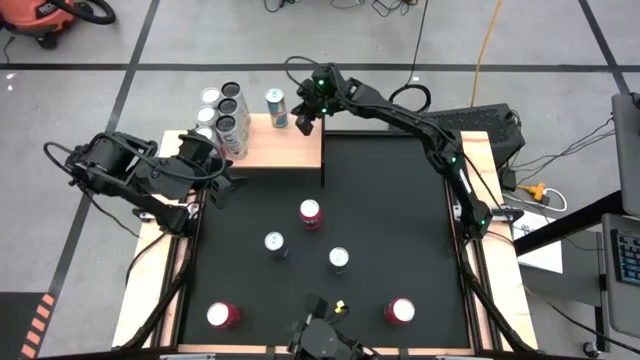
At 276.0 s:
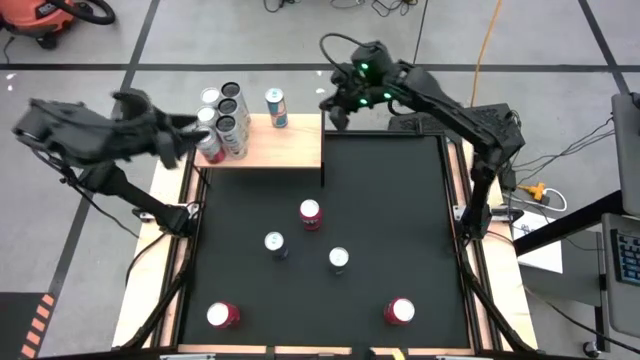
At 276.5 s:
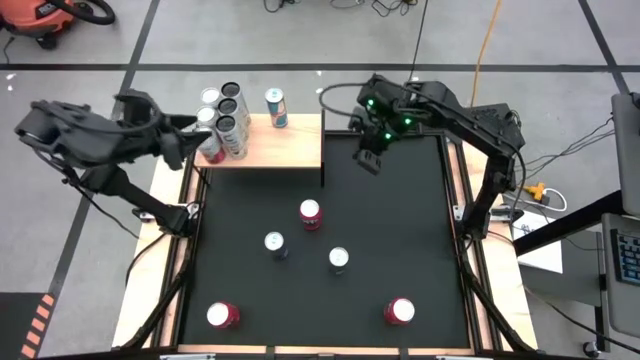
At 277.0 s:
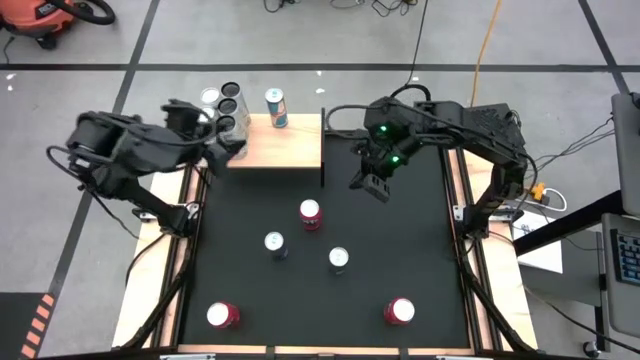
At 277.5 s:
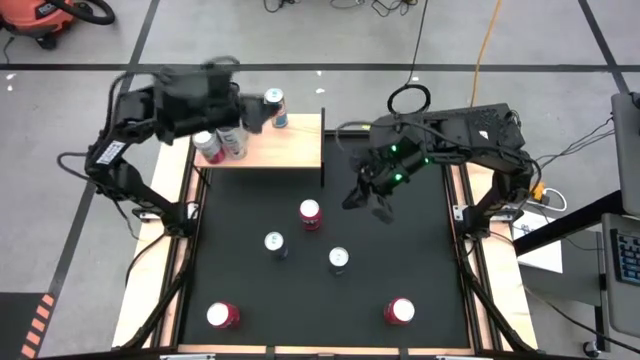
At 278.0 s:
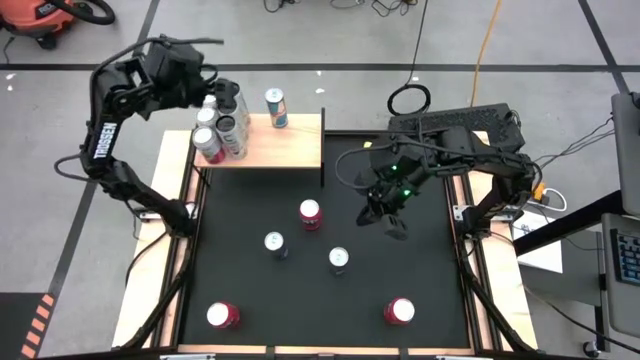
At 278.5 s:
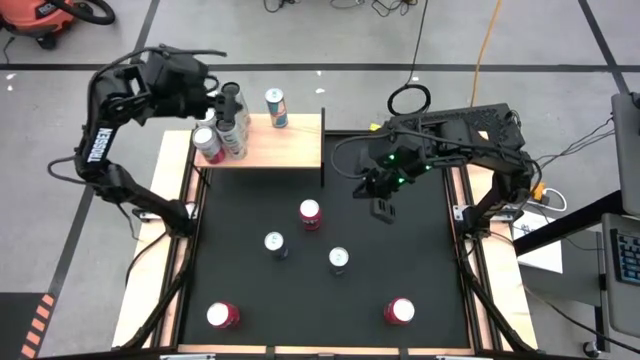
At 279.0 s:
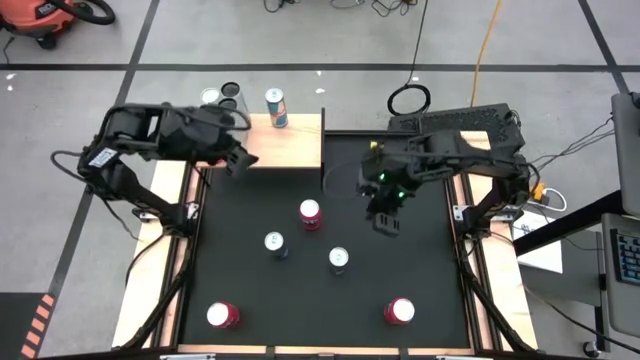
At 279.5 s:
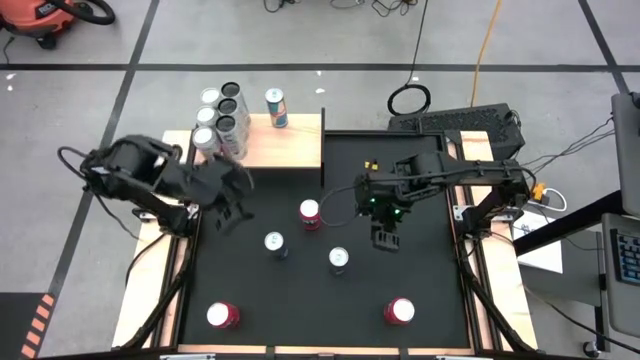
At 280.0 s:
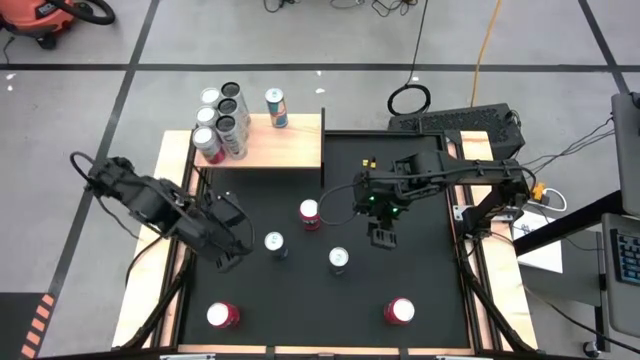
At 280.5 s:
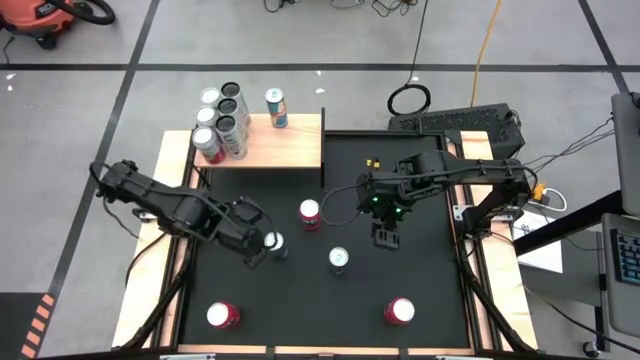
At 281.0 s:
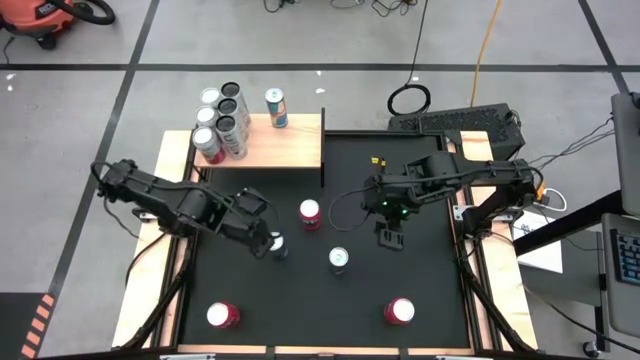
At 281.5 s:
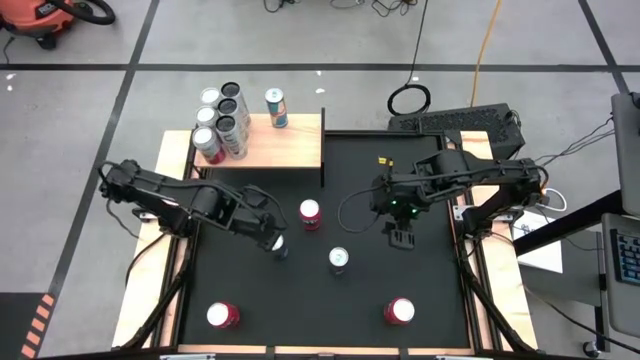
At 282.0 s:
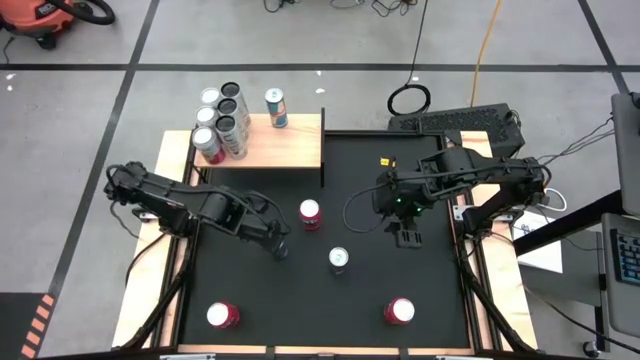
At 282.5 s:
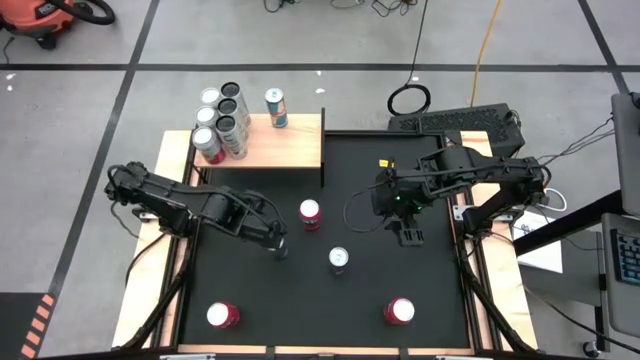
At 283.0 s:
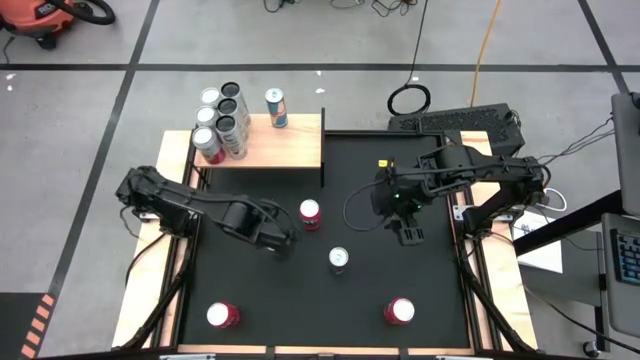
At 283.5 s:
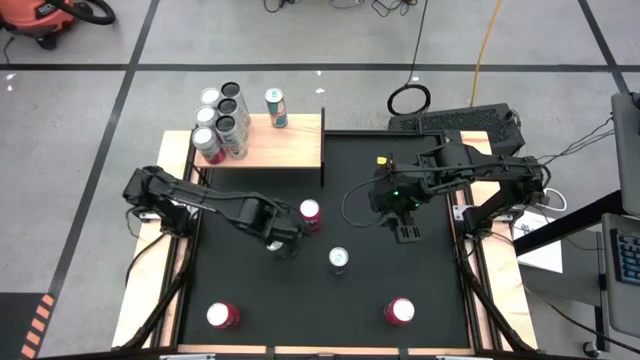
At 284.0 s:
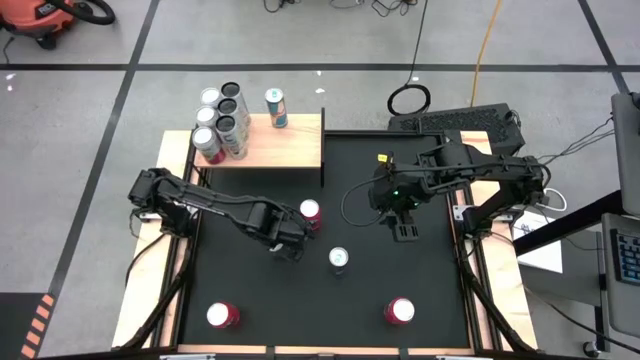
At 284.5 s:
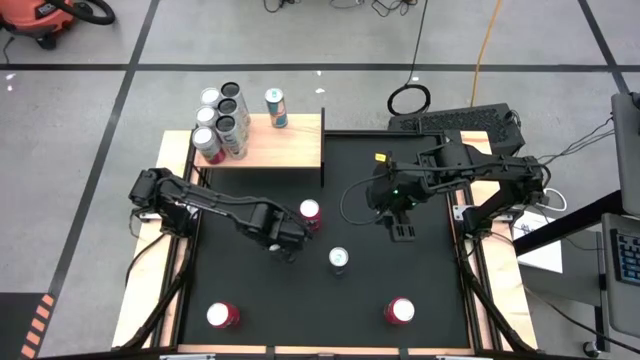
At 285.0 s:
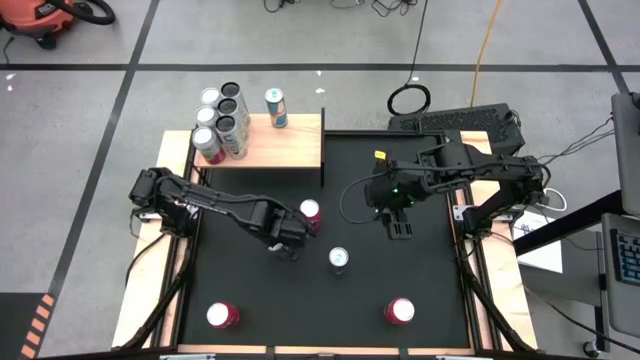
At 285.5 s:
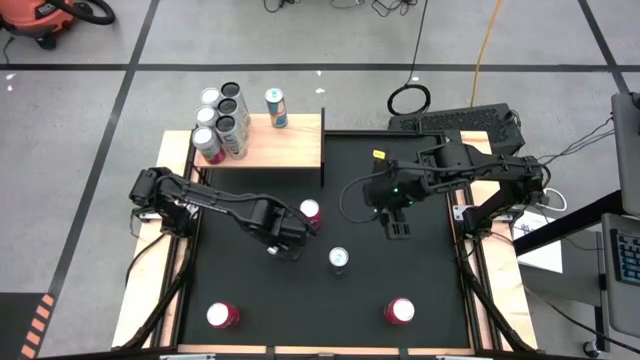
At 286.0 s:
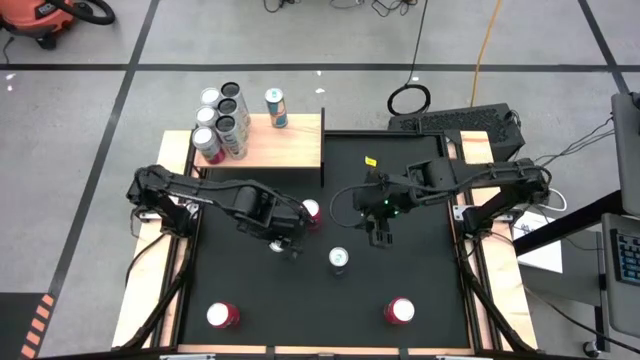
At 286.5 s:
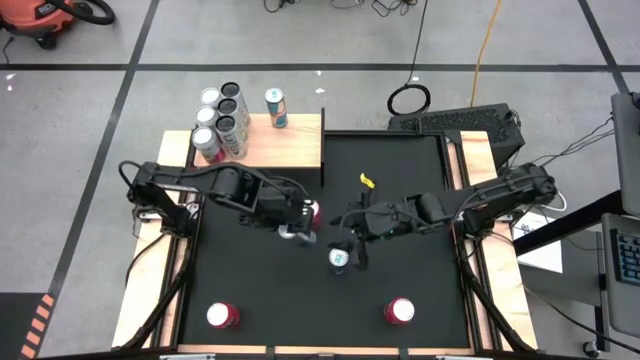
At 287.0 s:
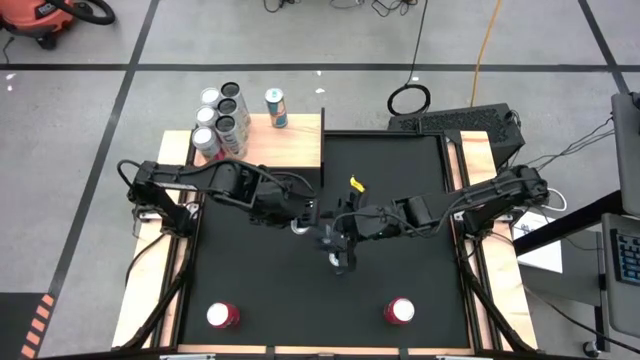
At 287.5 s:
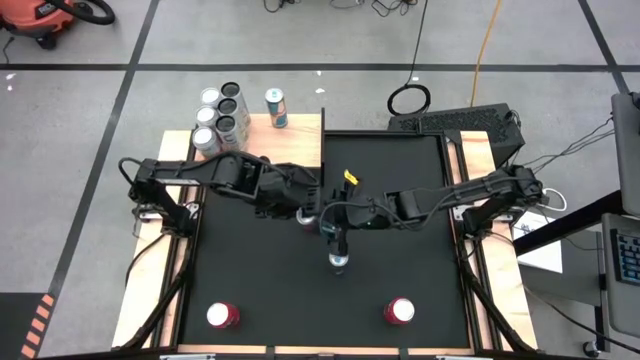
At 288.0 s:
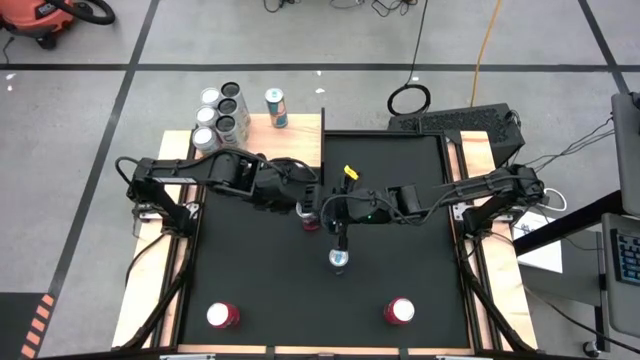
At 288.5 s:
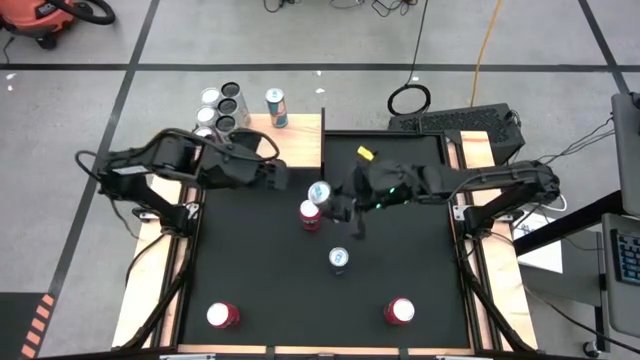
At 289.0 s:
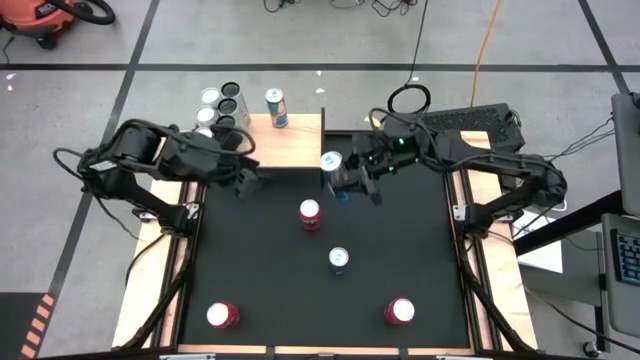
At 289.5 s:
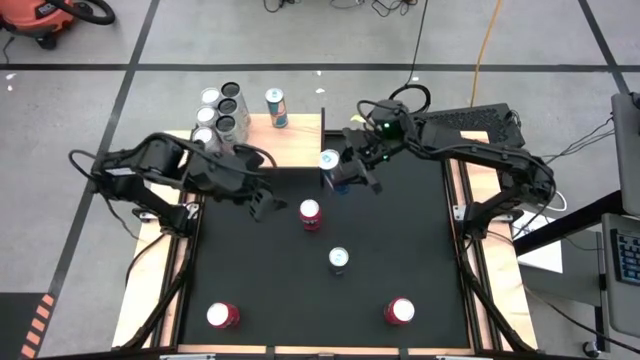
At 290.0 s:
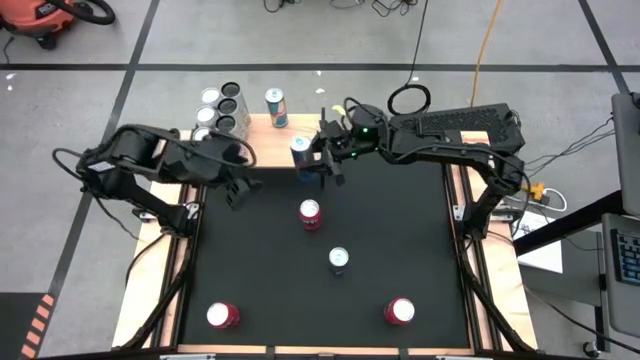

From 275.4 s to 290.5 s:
Task: Place canned beverage on shelf
Put the top blue soda can on the shelf aligned with the other blue soda can

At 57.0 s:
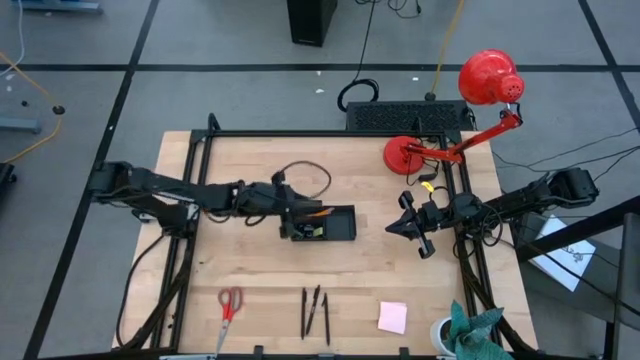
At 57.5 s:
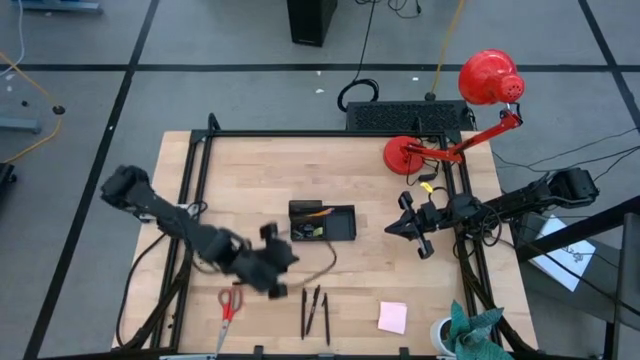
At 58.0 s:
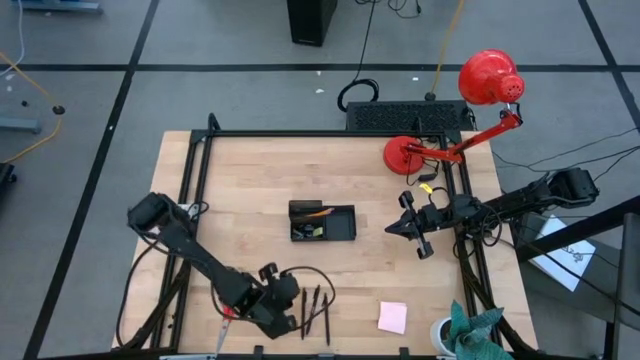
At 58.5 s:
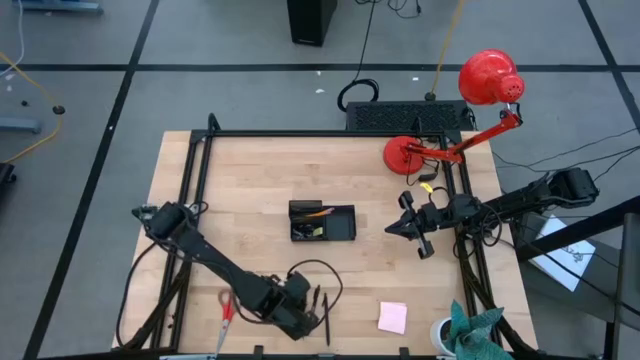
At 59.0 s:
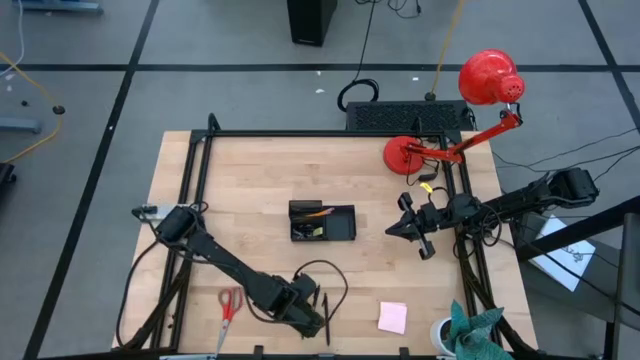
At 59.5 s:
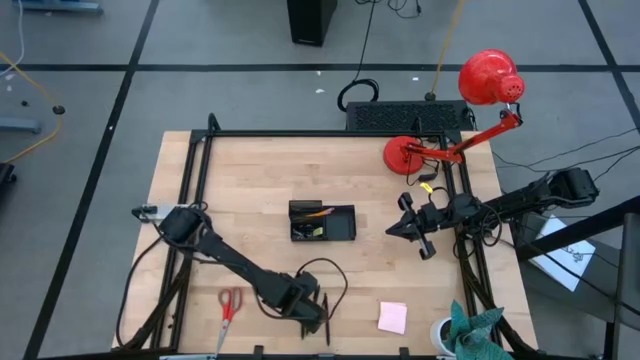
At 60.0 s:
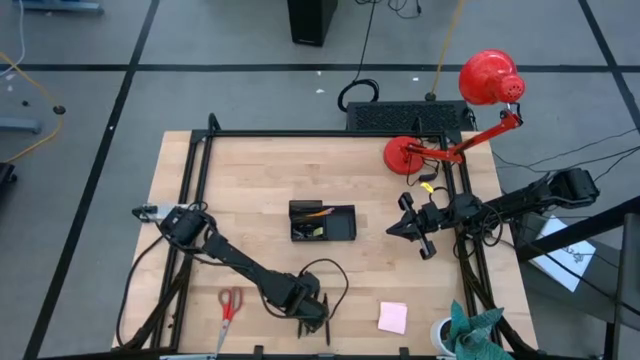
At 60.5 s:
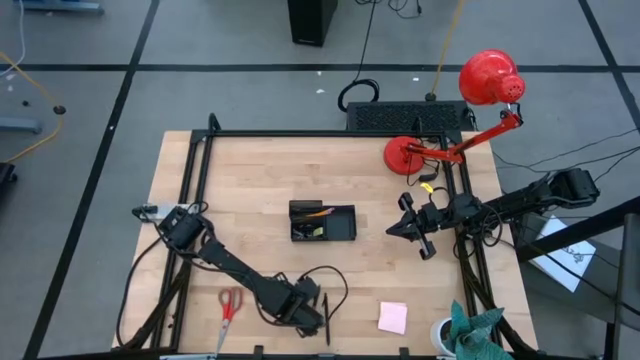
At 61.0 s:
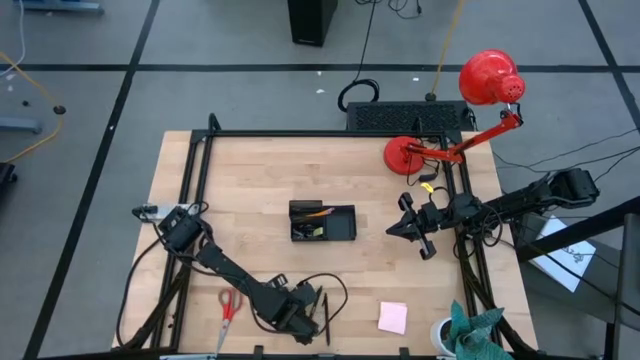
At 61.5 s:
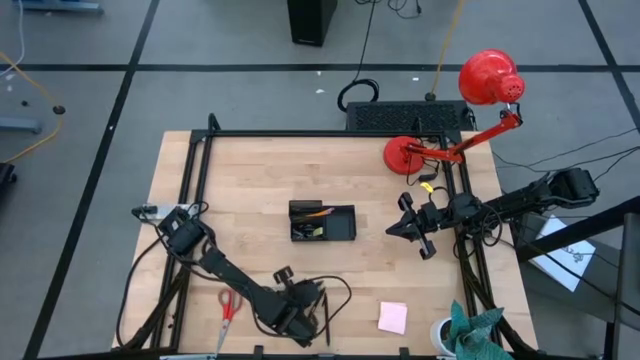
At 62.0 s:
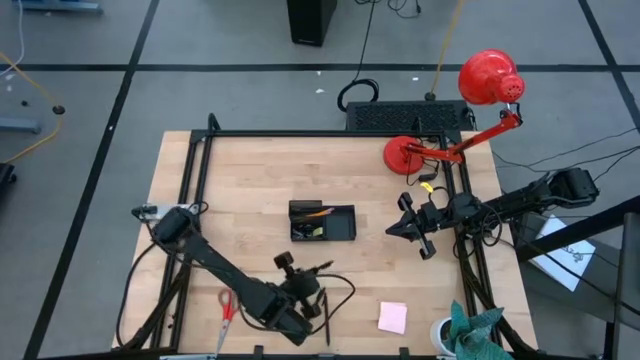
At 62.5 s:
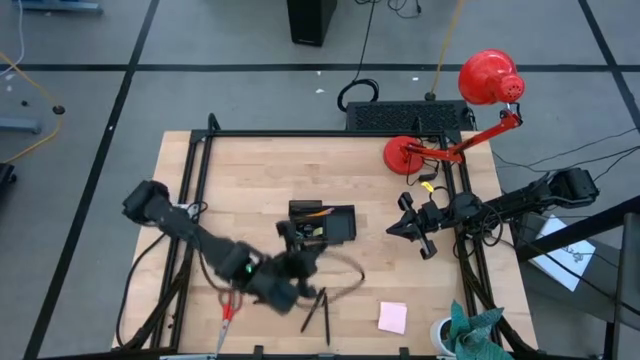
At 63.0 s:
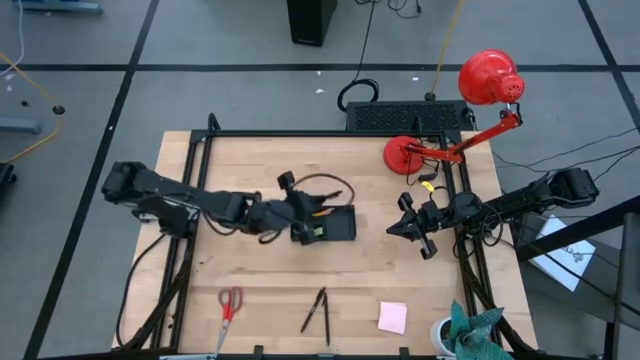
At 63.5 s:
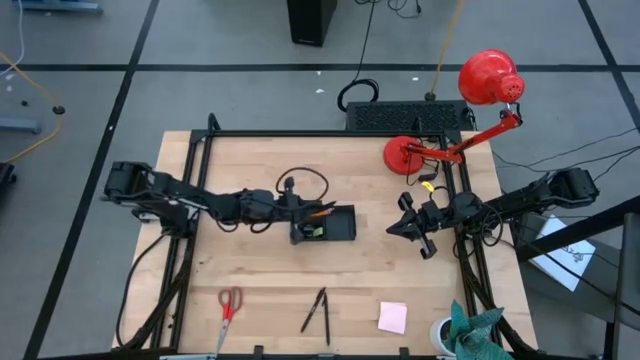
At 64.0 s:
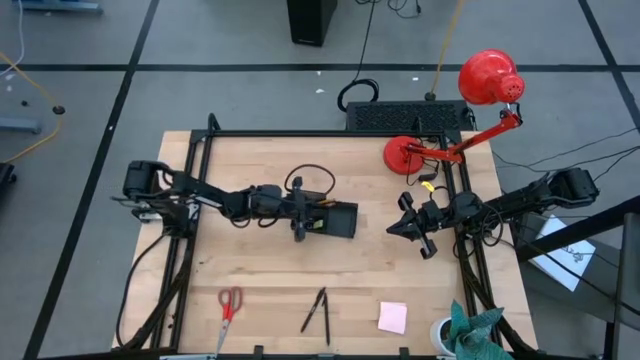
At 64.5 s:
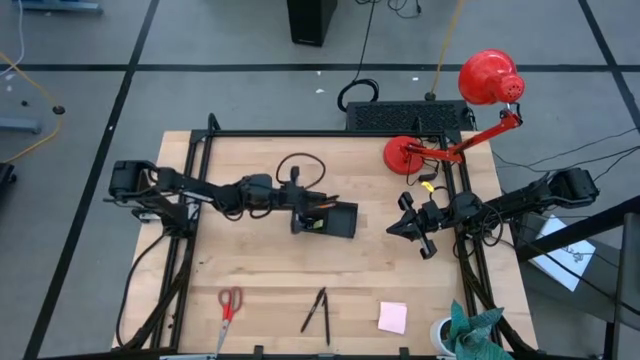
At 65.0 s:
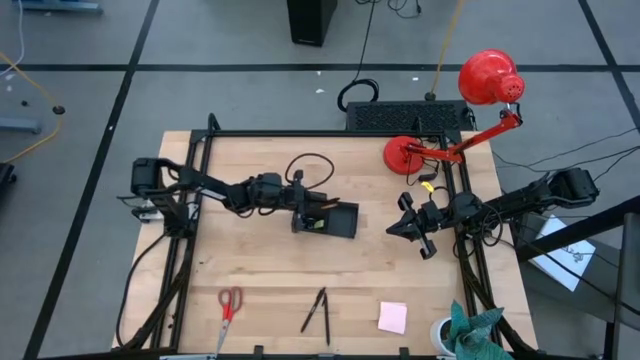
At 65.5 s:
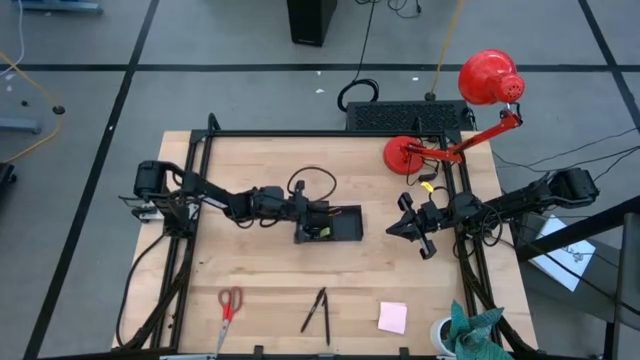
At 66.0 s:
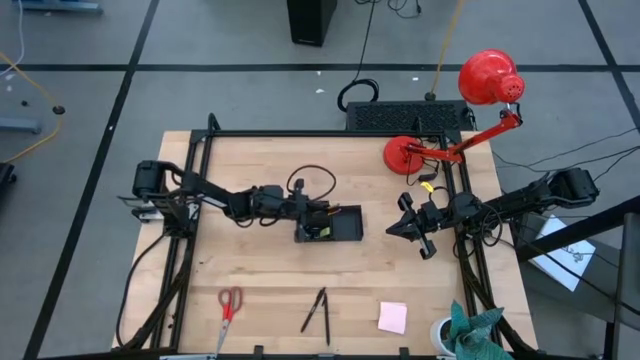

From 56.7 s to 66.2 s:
Task: Pick and place office supplies into organizer
Put the black pen into the desk organizer
